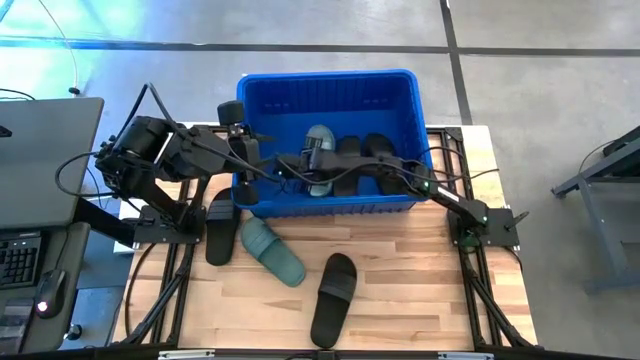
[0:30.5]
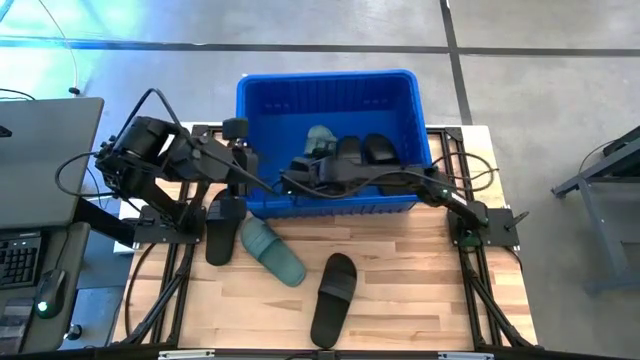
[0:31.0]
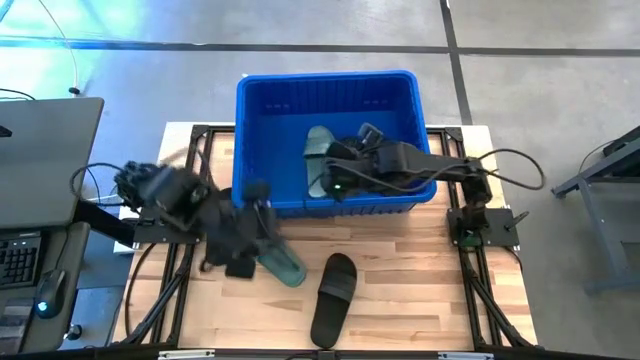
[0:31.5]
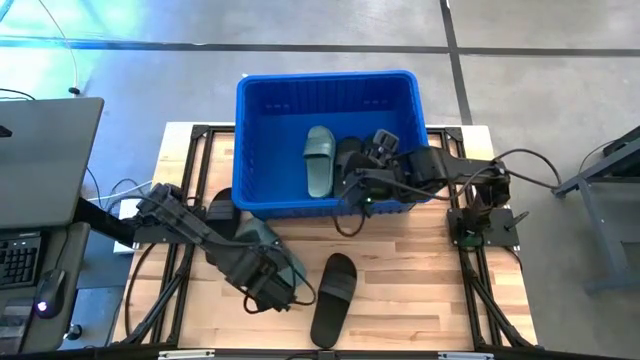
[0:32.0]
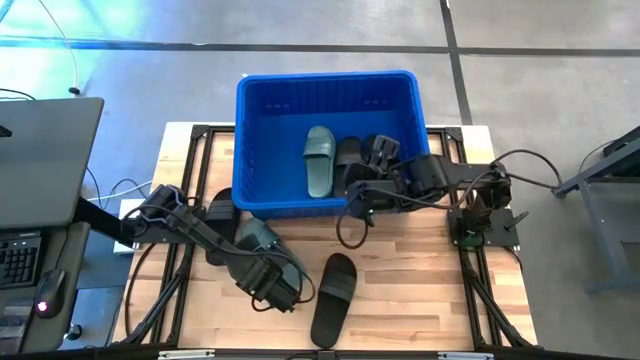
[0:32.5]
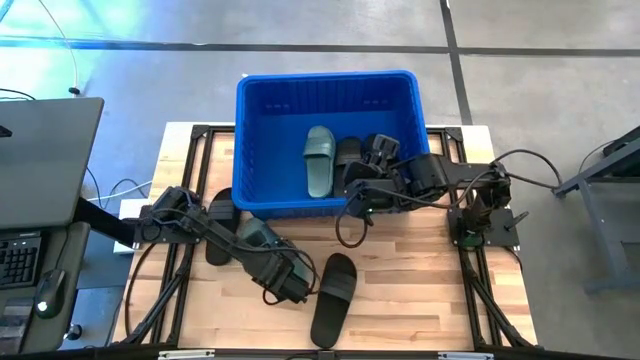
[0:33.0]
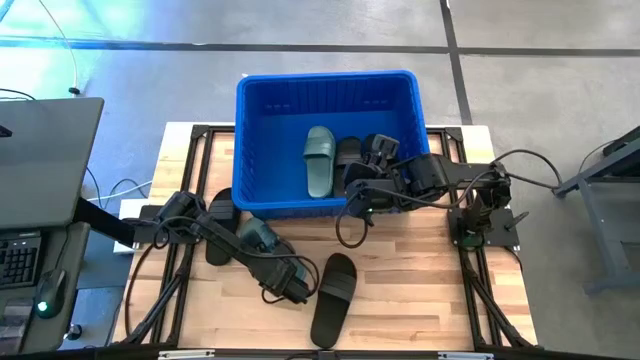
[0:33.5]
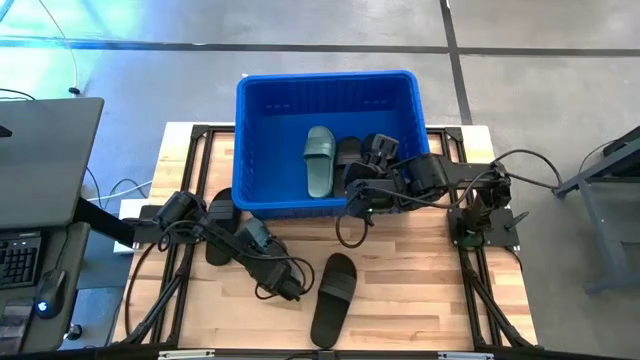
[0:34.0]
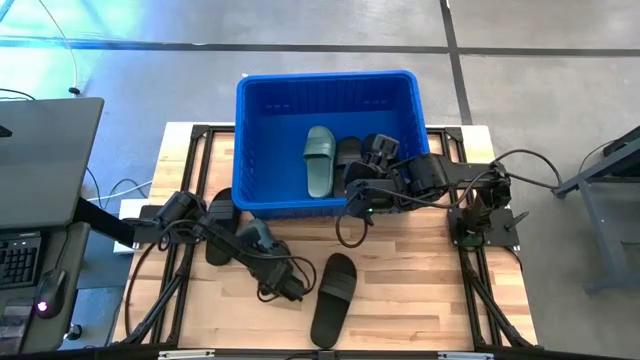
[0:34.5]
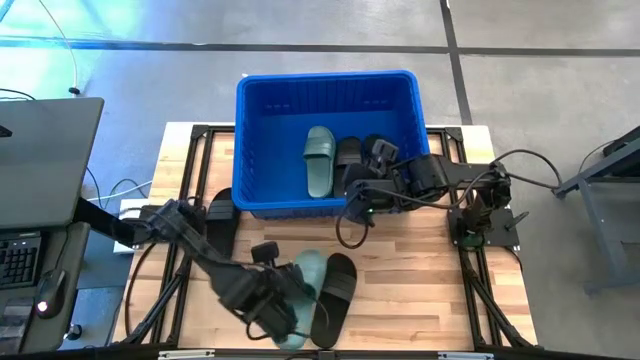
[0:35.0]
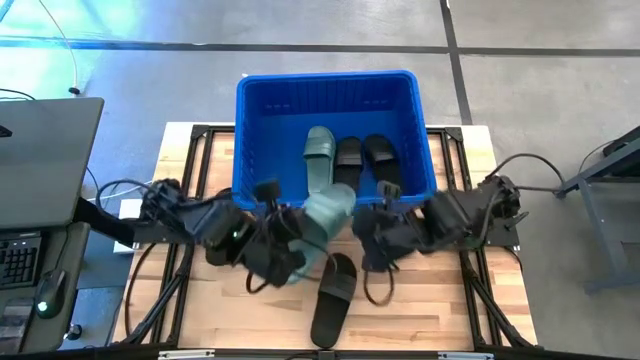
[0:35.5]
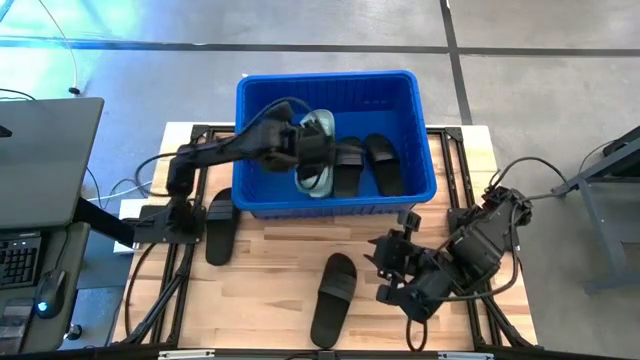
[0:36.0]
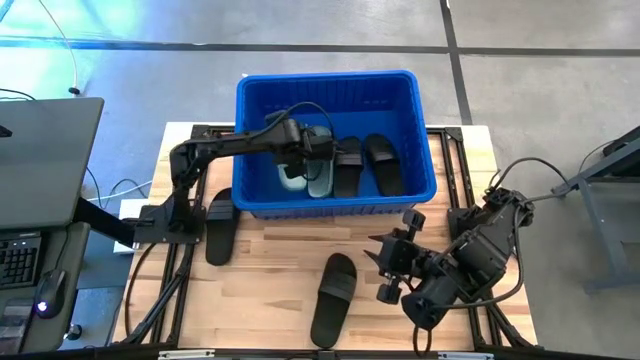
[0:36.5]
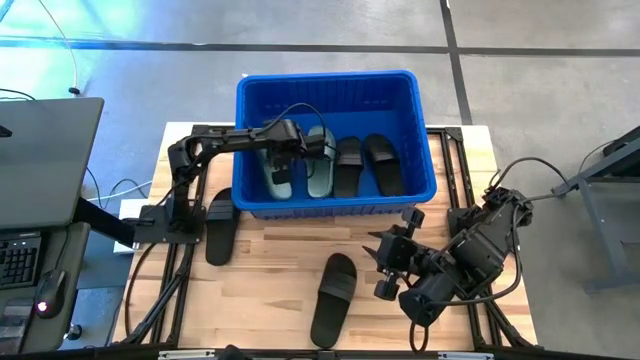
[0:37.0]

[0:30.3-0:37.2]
Task: Pick and place slides into bin
Put the green slide into the blue bin

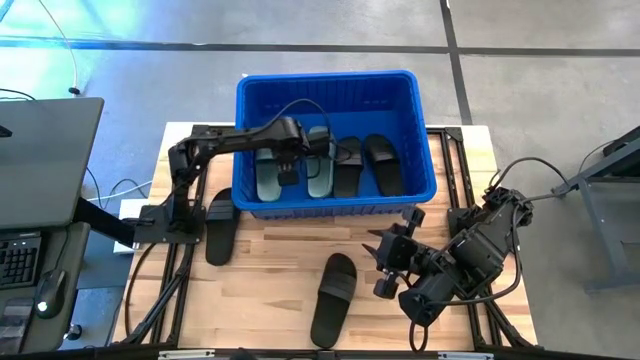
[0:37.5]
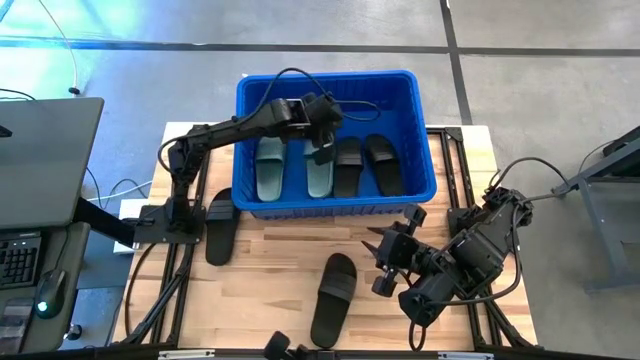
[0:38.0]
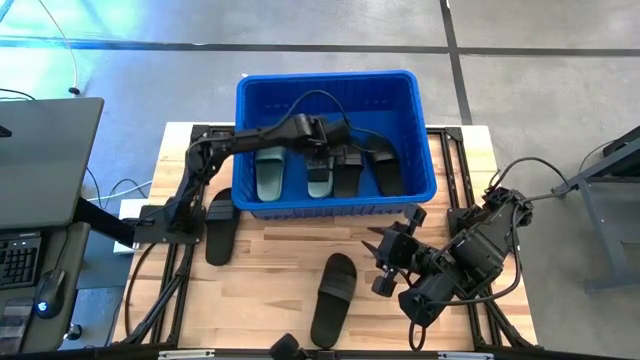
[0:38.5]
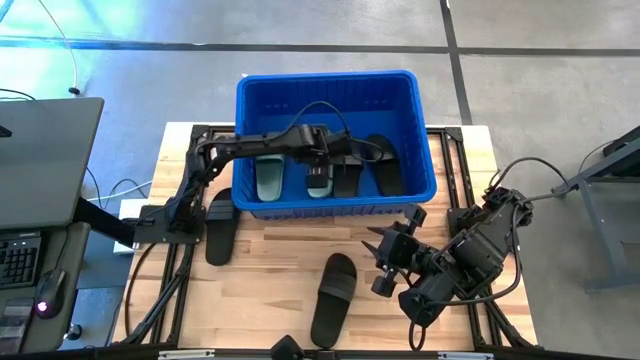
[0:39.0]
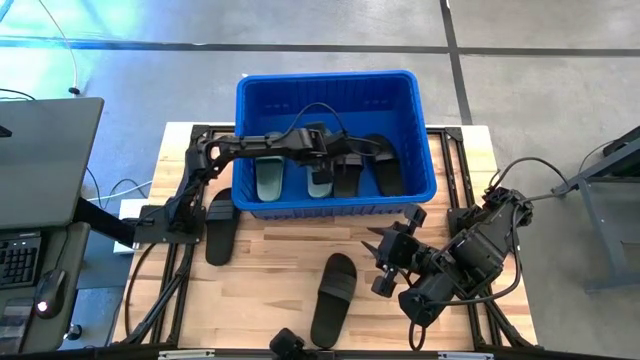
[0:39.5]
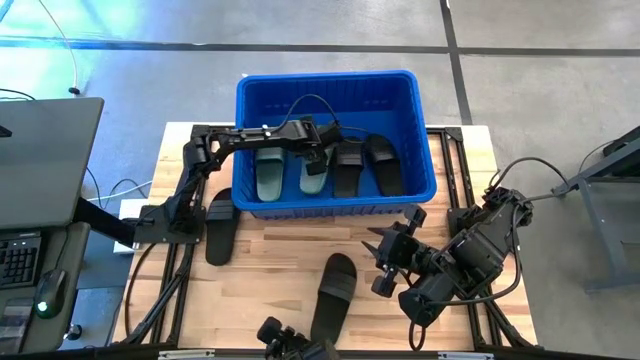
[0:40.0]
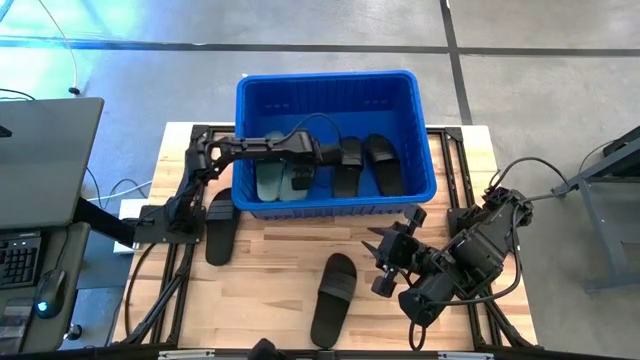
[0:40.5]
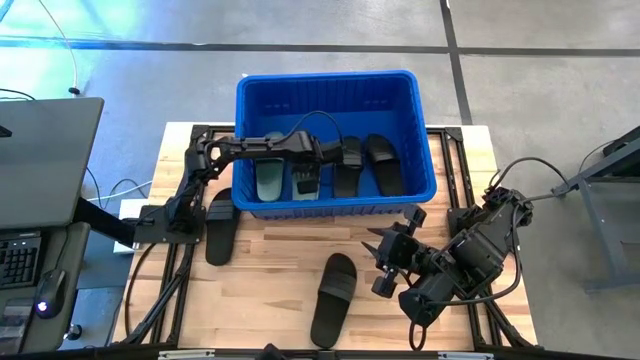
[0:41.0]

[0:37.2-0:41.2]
Adjust the green slide in the blue bin

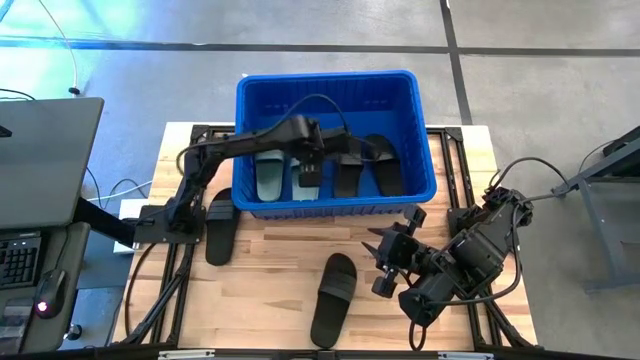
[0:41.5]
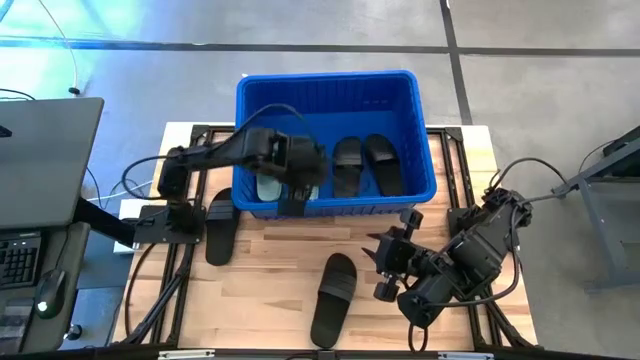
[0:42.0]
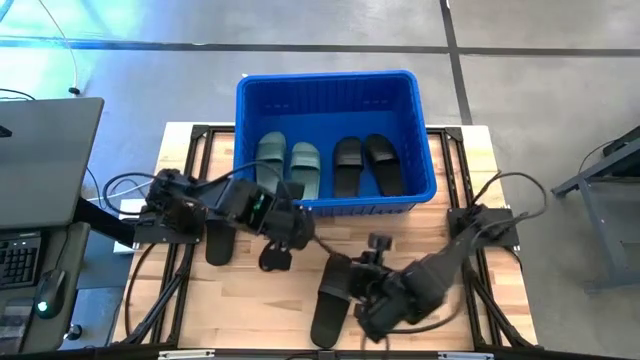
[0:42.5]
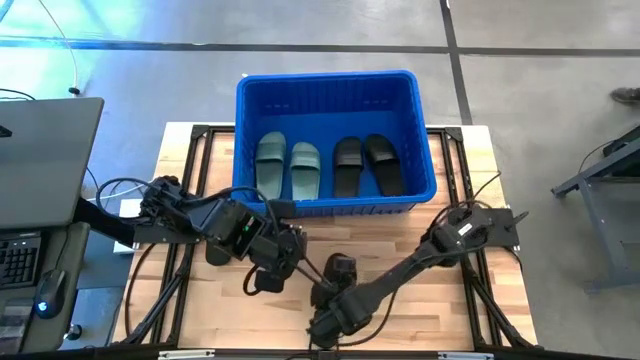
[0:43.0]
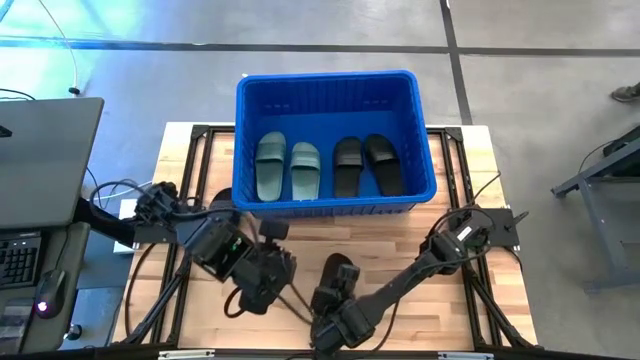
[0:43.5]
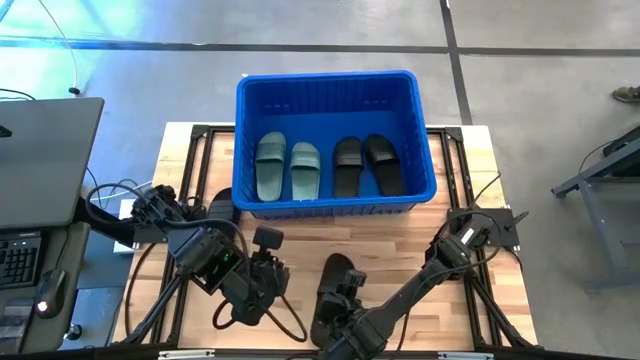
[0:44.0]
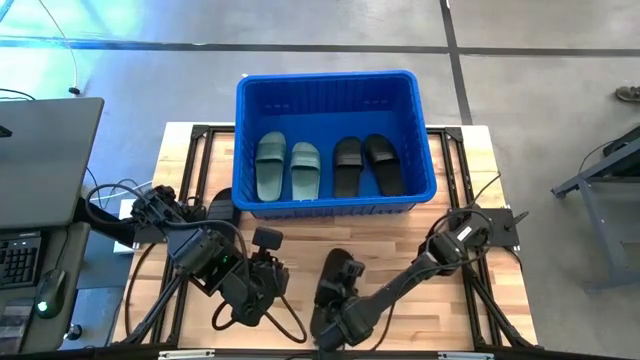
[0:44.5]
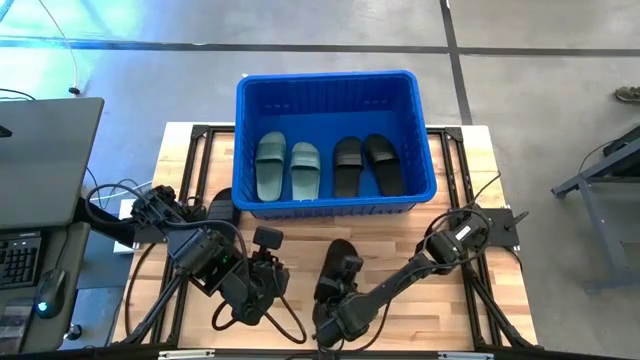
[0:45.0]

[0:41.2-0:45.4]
Put the black slide into the blue bin

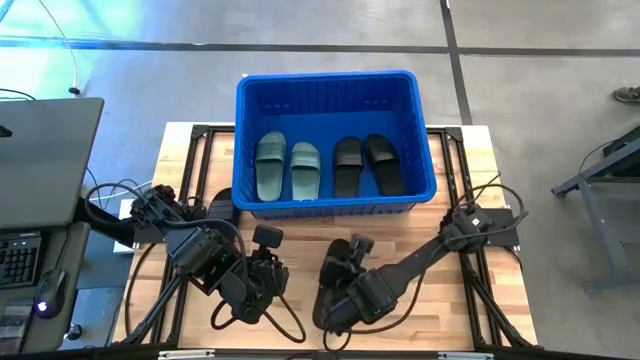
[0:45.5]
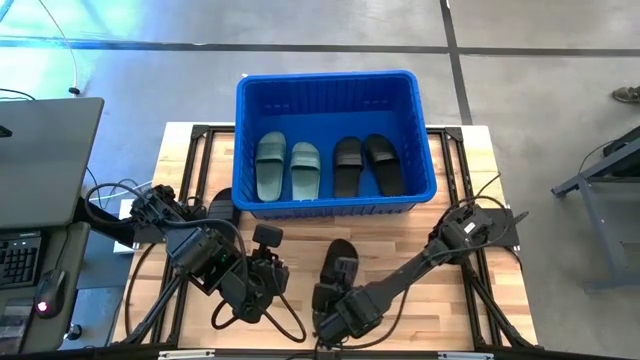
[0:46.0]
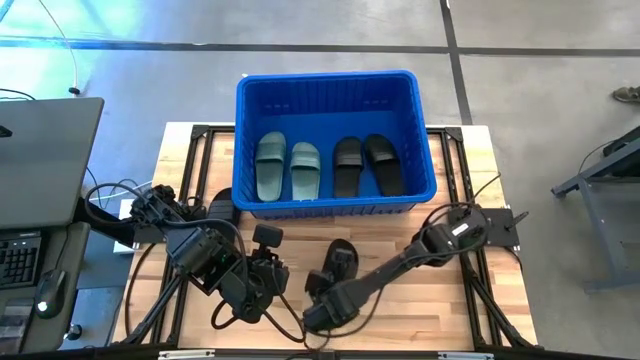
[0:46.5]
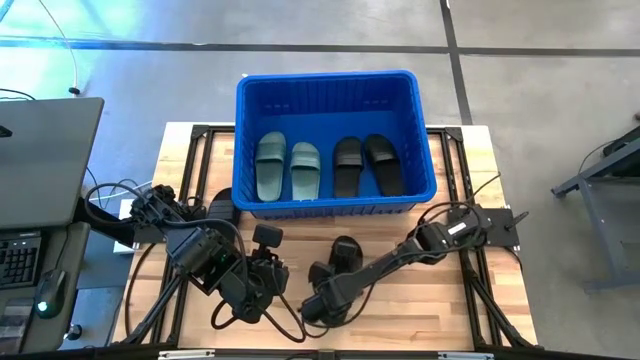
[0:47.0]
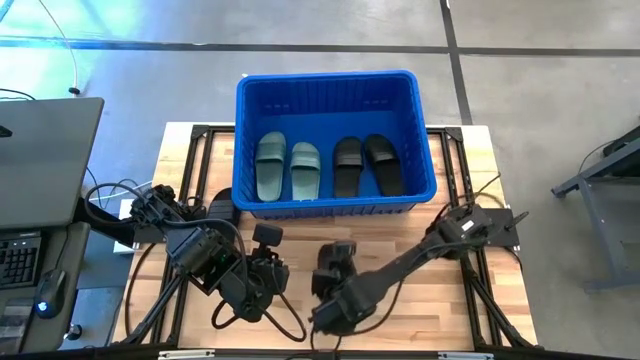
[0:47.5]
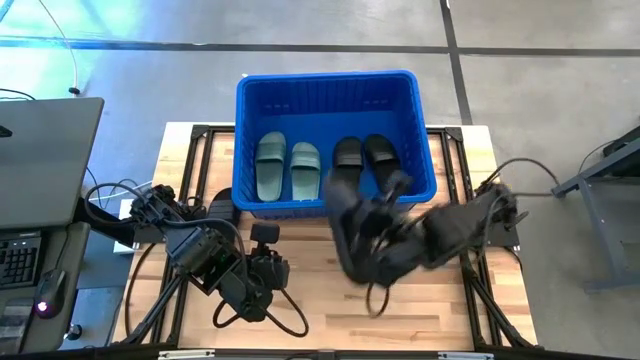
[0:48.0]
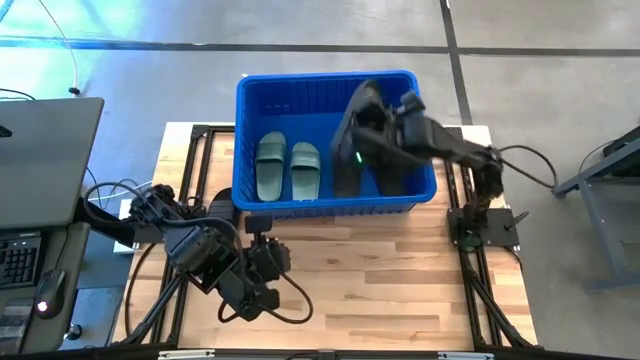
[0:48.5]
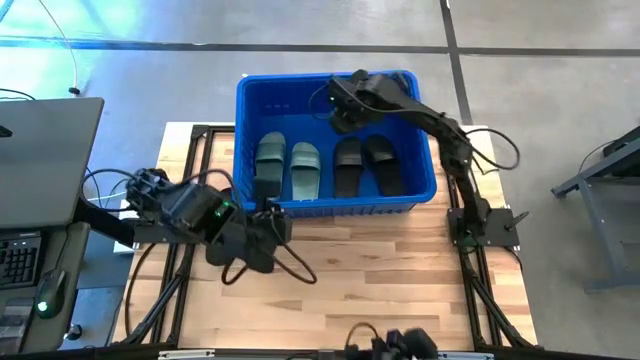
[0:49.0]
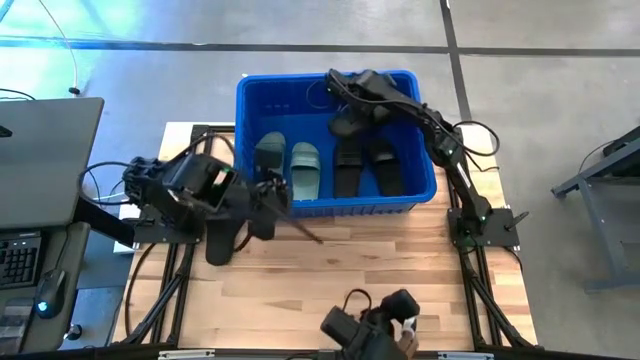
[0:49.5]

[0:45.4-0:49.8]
Put the black slide into the blue bin

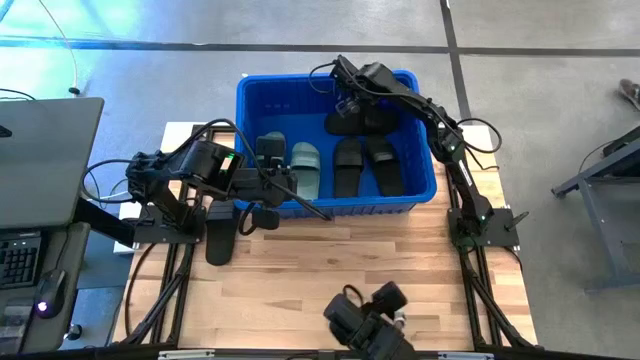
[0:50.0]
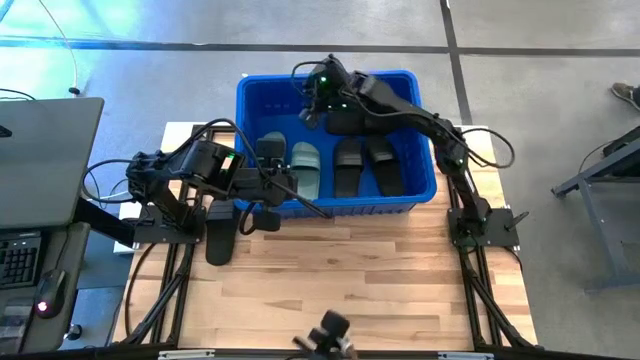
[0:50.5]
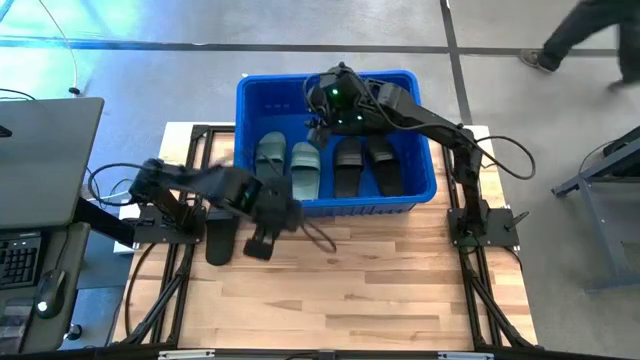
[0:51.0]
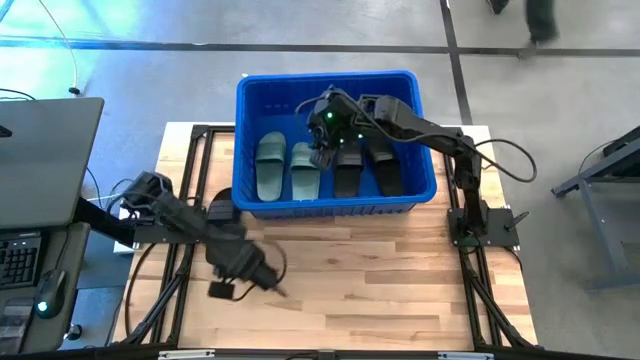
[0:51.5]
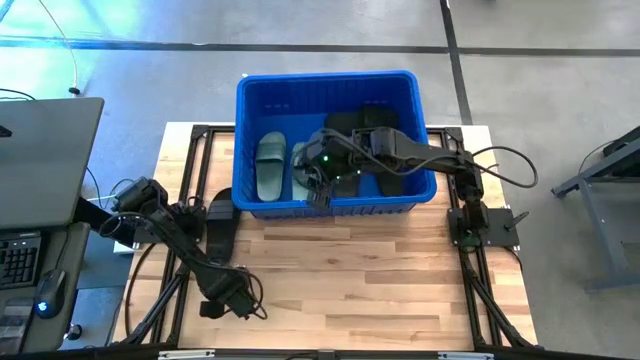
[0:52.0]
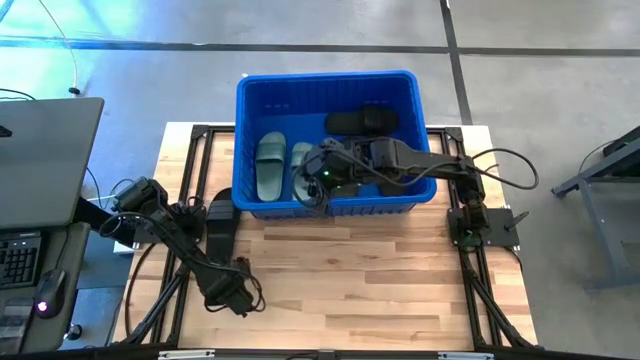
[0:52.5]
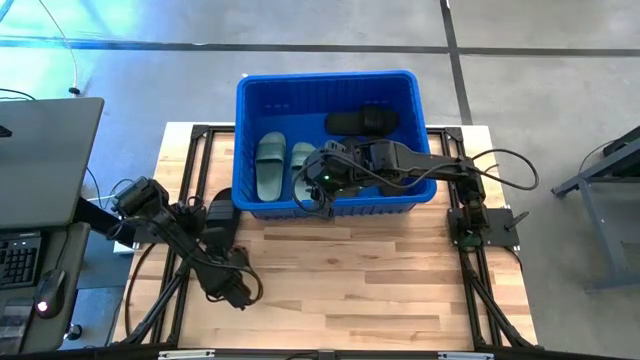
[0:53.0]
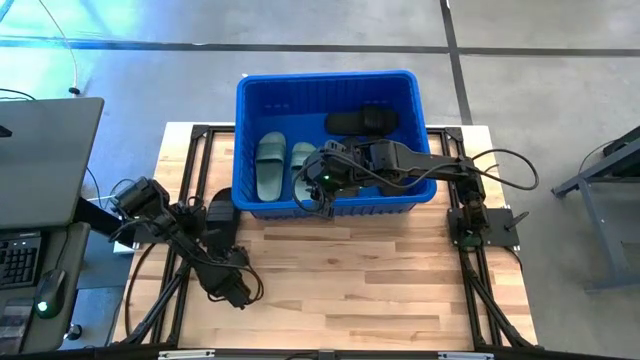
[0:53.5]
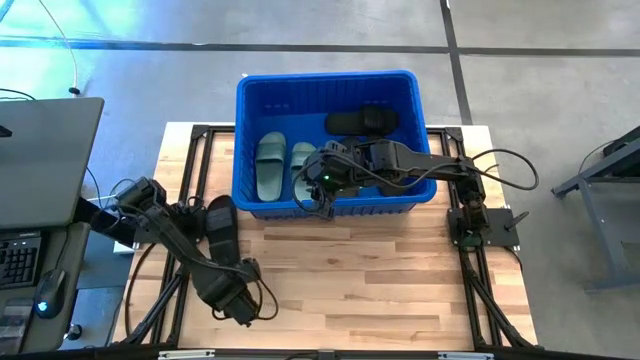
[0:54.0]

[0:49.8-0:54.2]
Put the black slide into the blue bin
